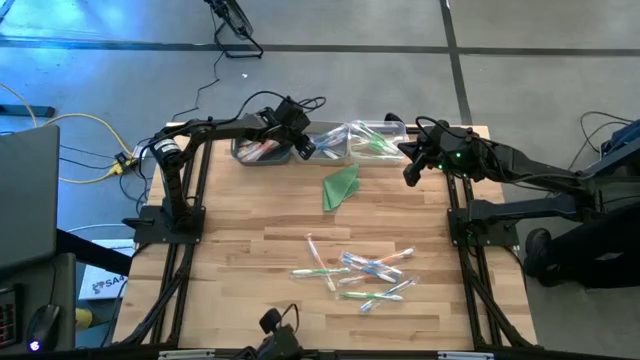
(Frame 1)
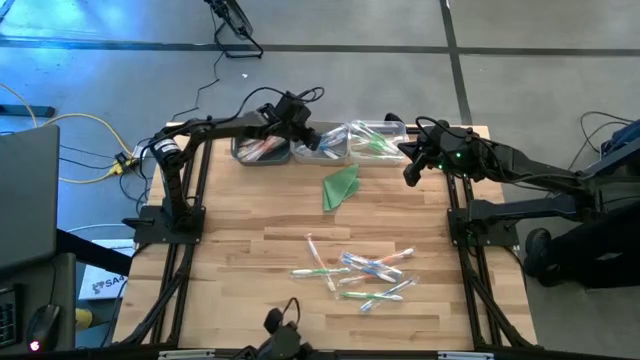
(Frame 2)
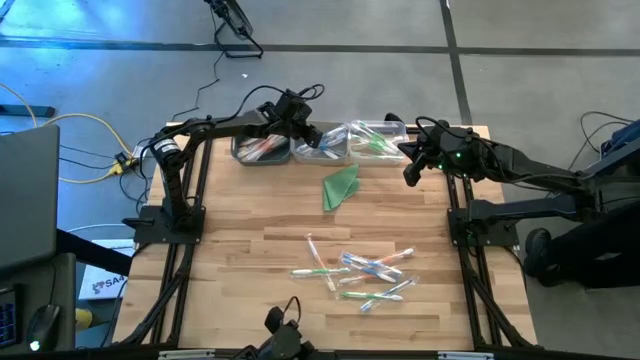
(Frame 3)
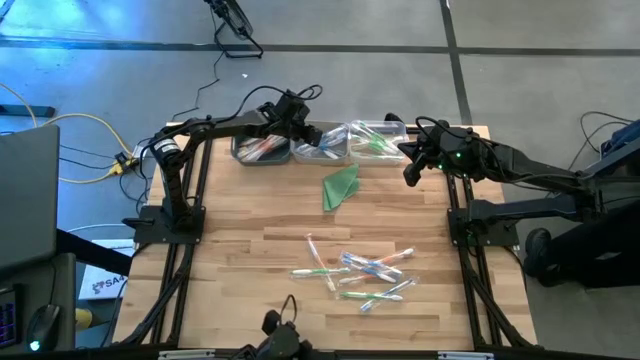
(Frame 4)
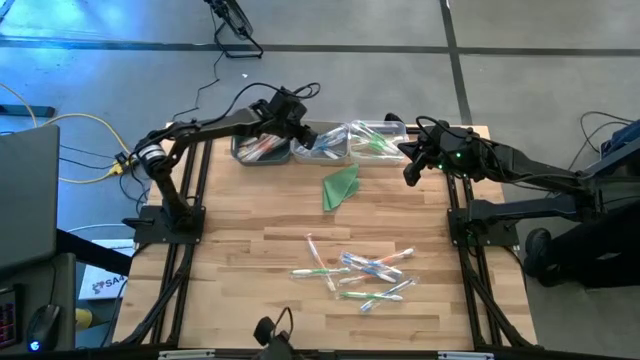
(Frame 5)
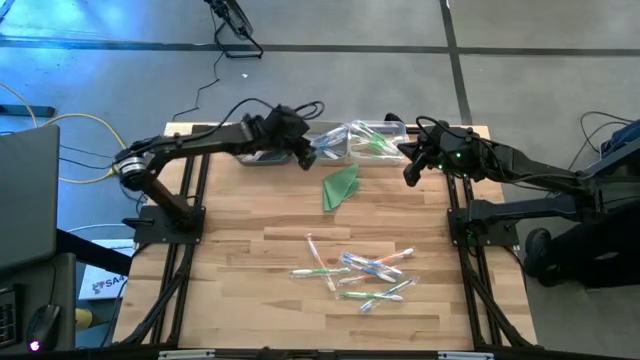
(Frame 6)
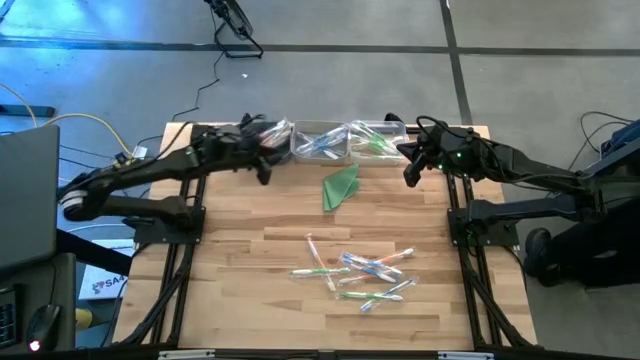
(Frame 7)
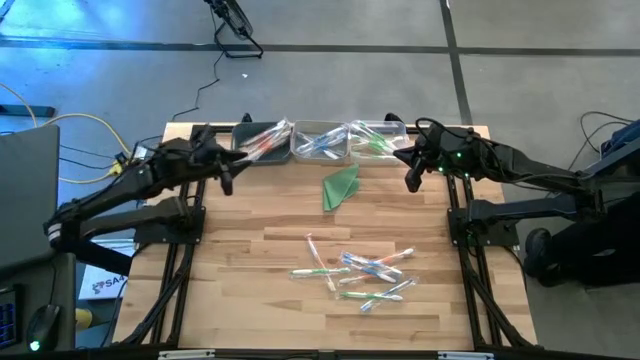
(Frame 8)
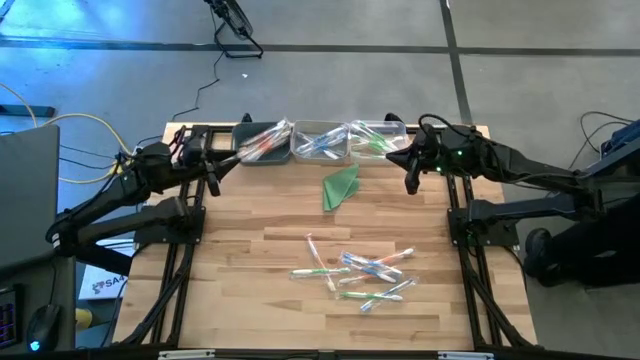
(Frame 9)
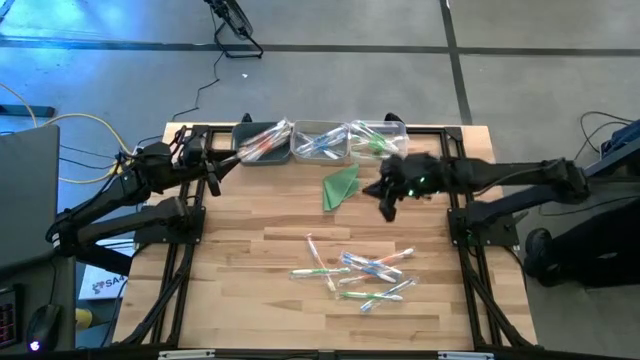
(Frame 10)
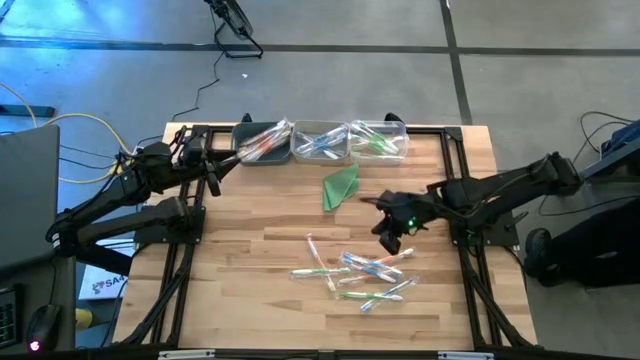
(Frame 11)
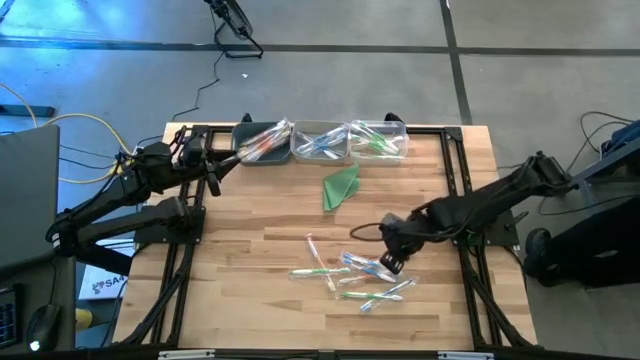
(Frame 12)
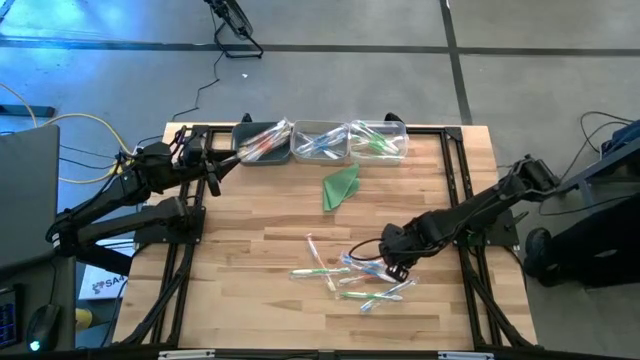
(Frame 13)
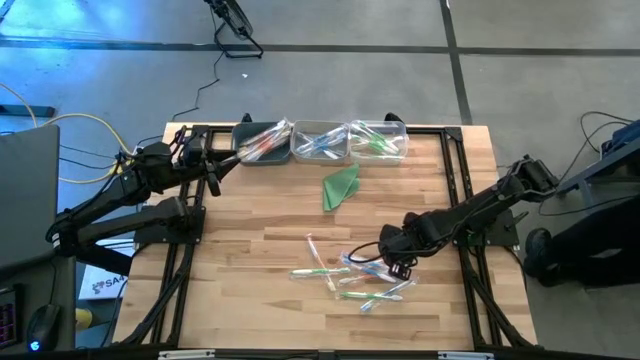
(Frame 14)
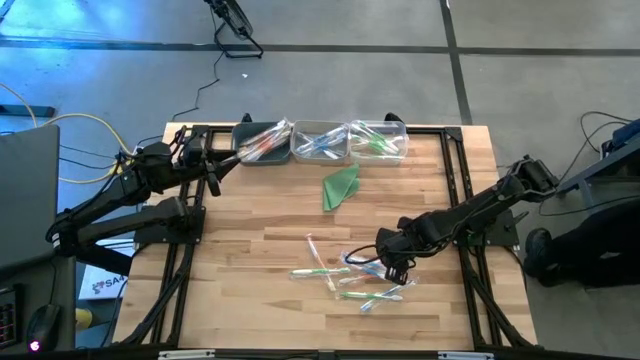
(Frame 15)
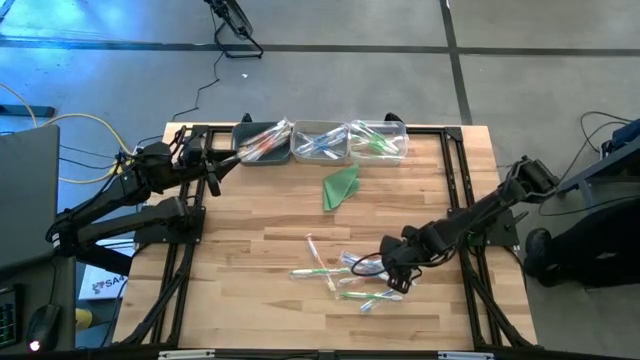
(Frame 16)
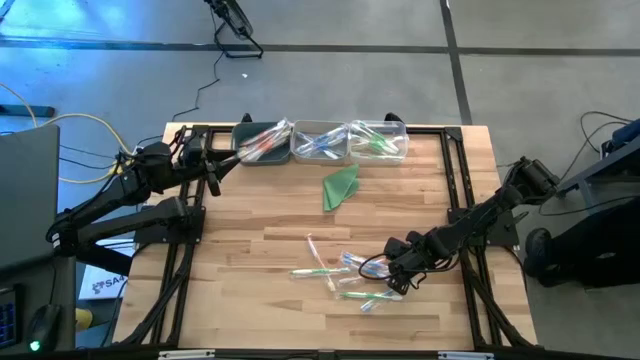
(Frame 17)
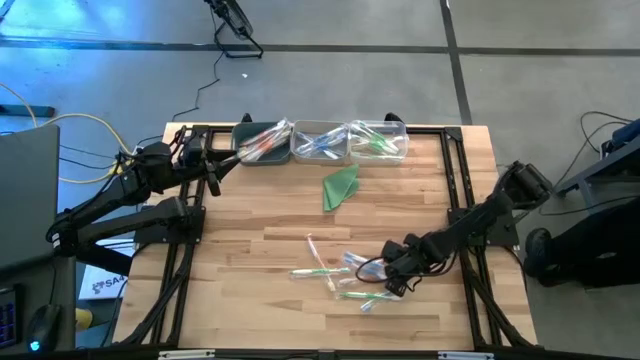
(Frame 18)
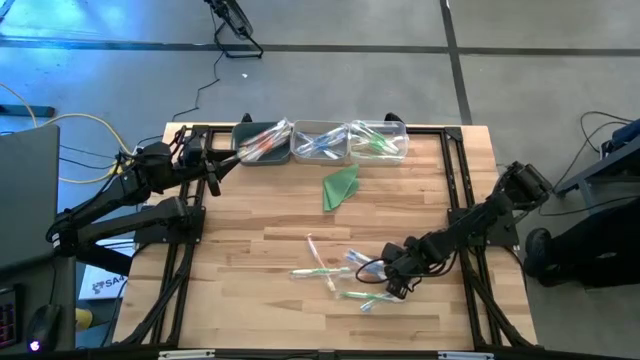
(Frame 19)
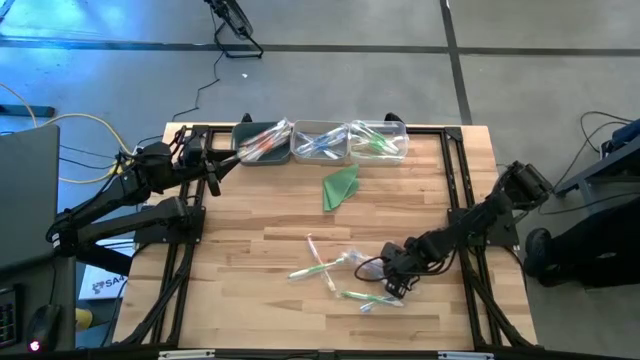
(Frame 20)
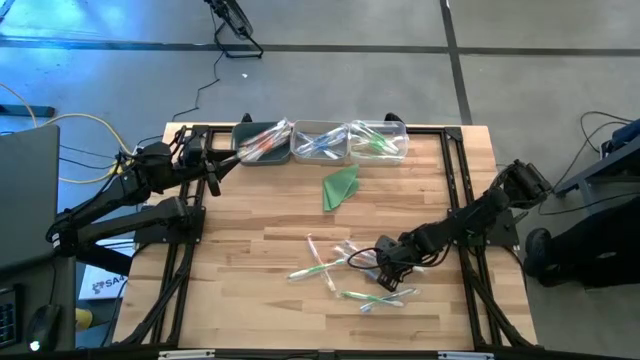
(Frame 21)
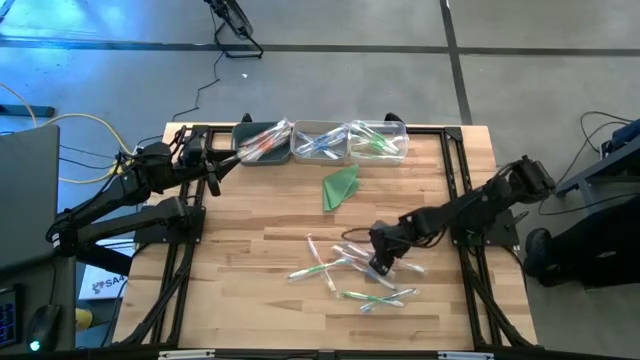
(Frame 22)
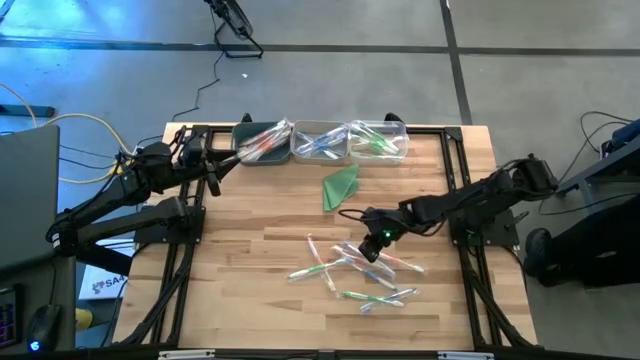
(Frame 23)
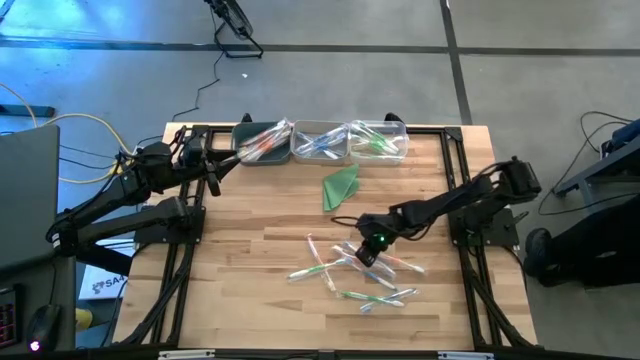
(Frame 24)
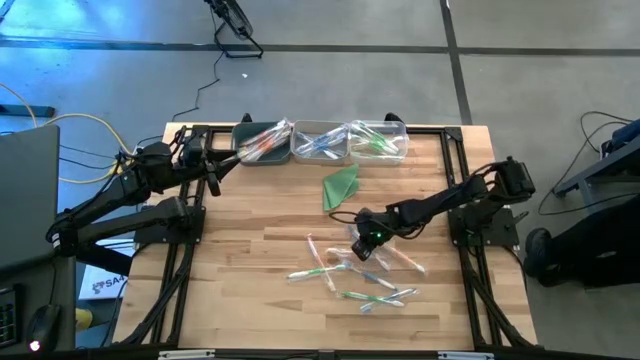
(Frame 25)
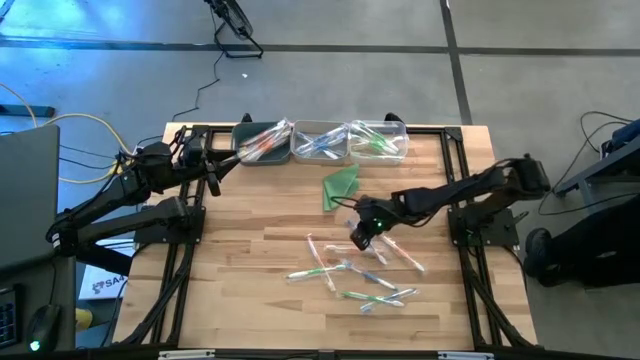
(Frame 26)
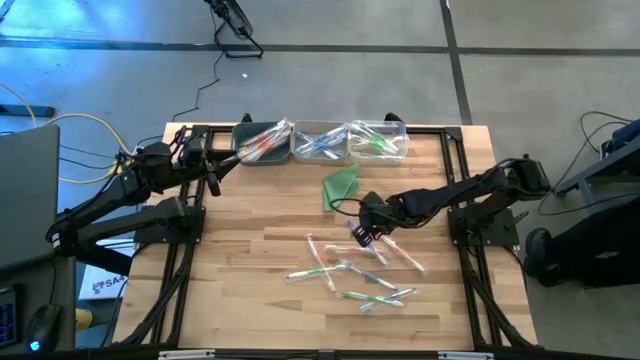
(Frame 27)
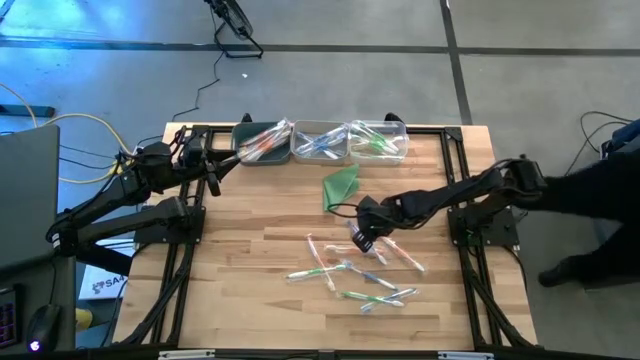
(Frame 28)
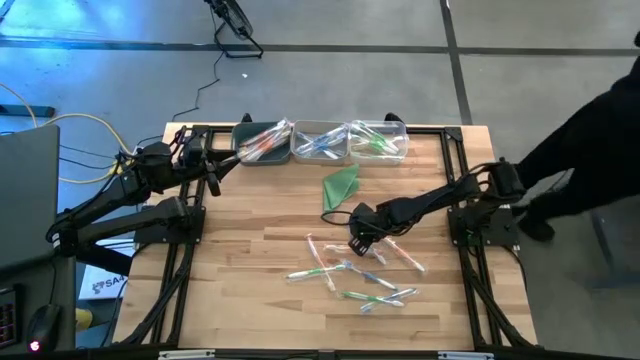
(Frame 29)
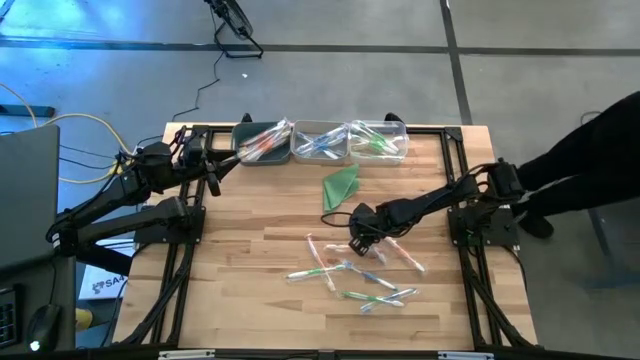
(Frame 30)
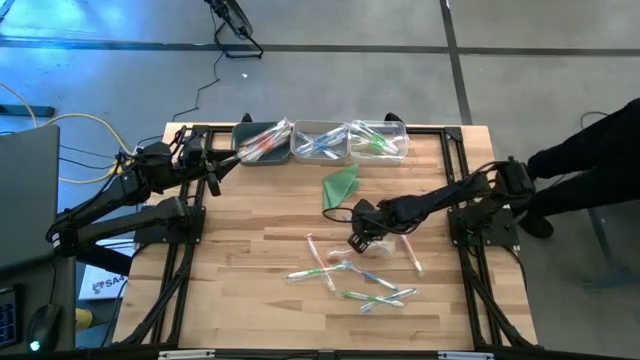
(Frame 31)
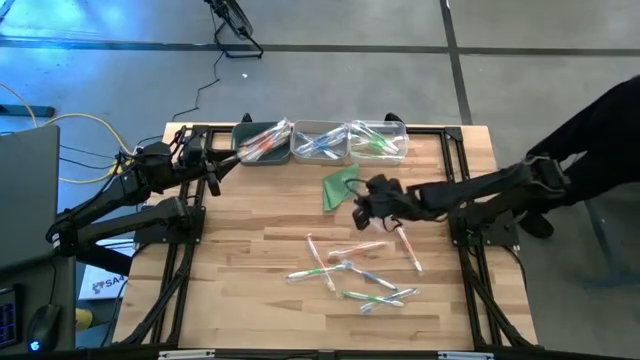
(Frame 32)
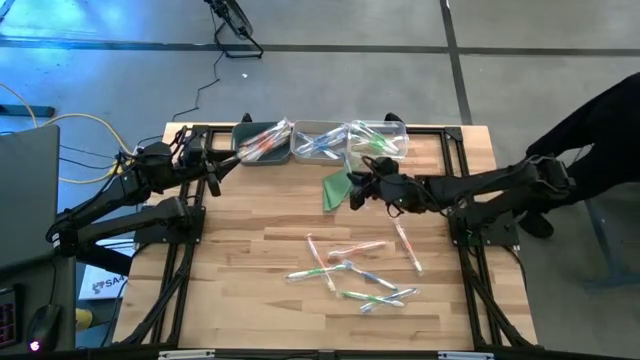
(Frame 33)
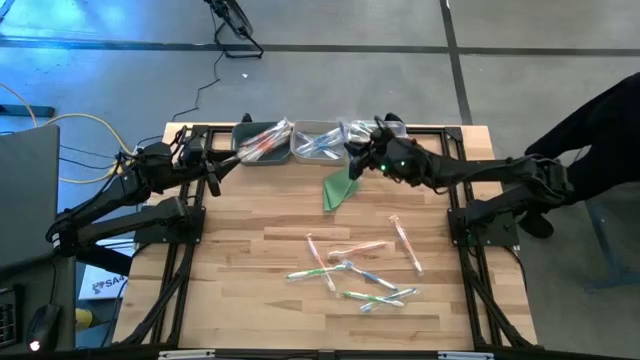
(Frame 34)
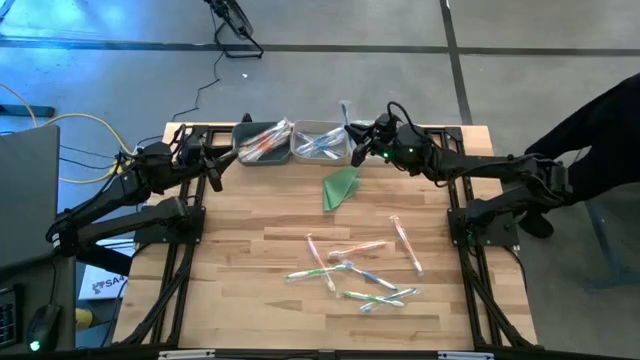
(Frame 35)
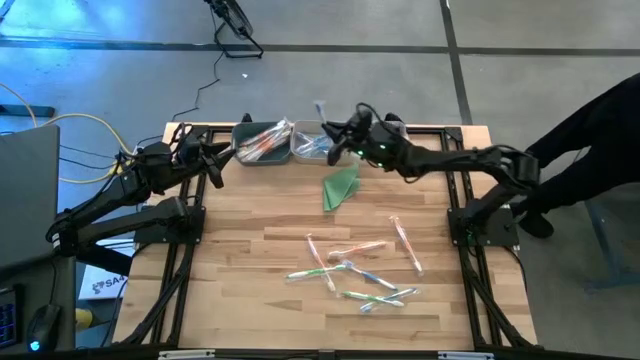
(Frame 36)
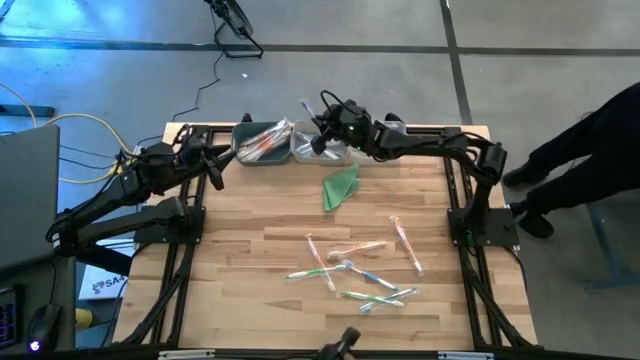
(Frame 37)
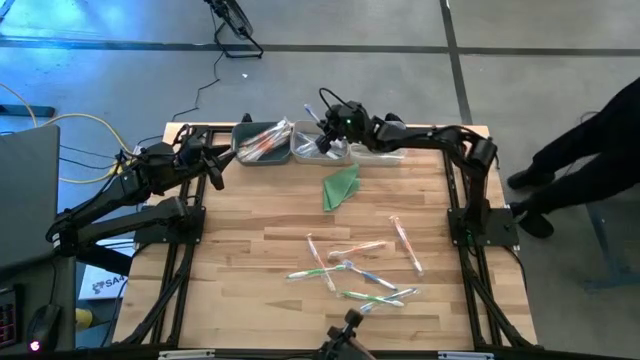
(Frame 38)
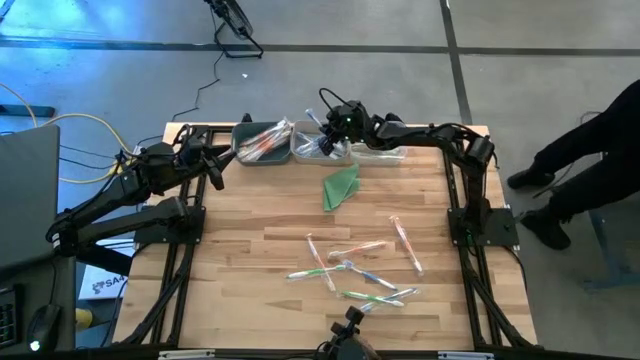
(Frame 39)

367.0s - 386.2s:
Task: Pick & Place Toothbrushes
Put the blue toothbrush into the gray bin

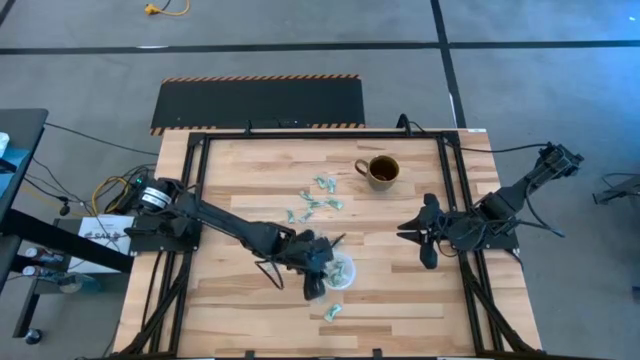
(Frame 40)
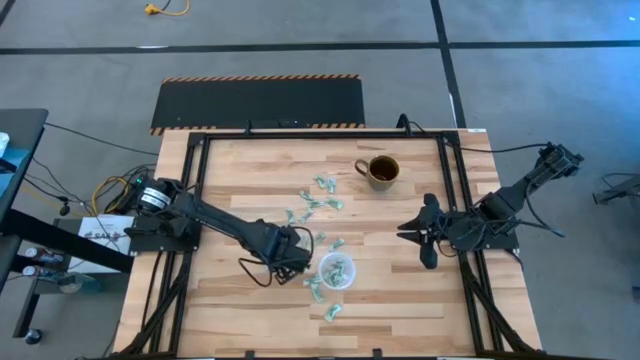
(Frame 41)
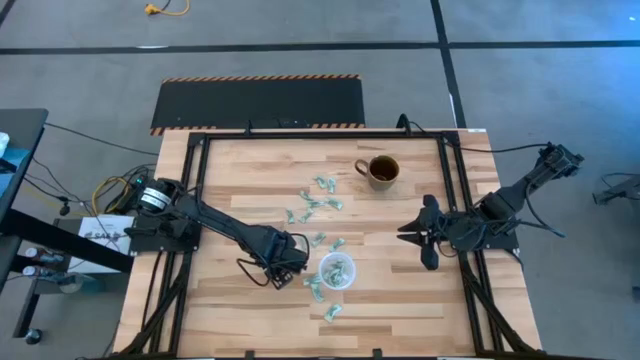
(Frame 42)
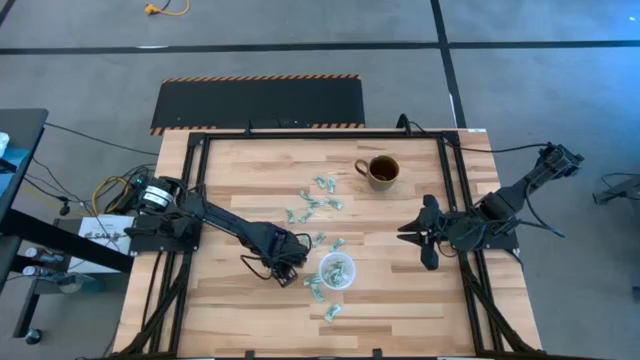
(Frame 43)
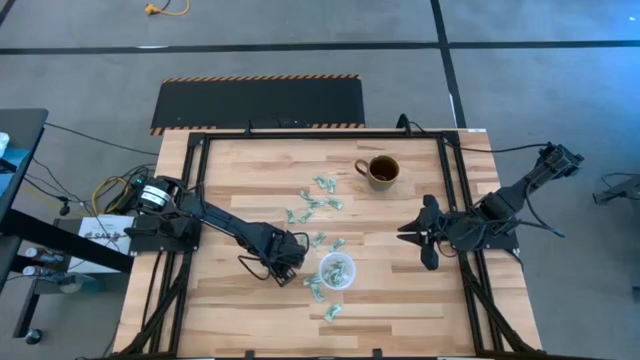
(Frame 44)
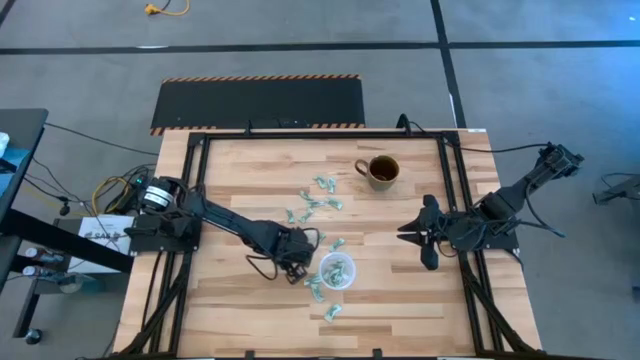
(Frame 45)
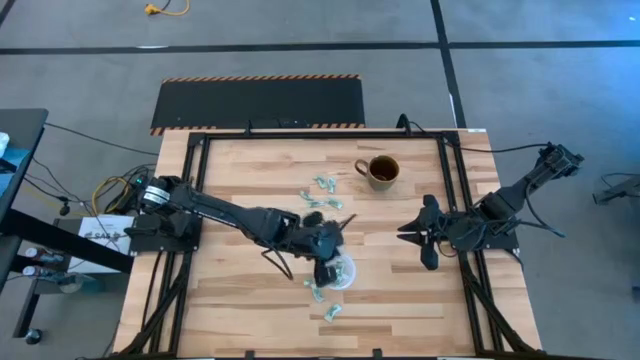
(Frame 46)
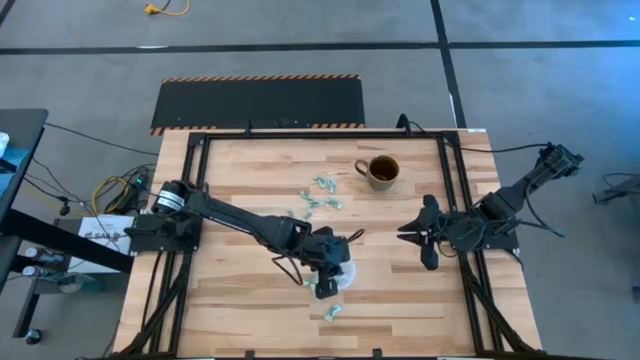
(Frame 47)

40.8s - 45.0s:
Task: Pick and place Stevia / Truvia into bins
Put the green stevia packet into the transparent container
